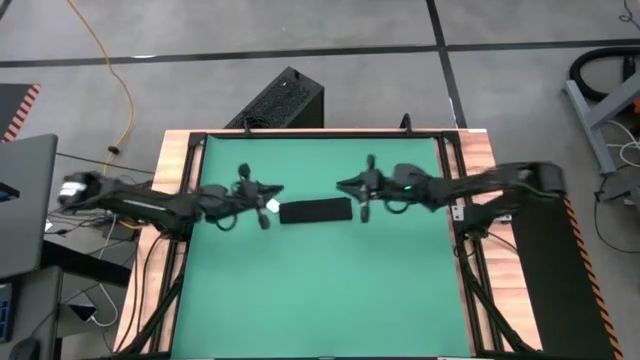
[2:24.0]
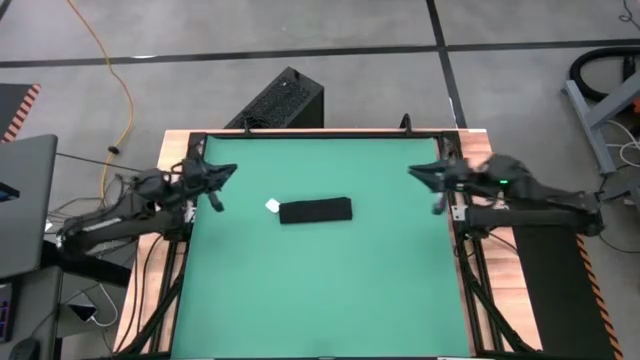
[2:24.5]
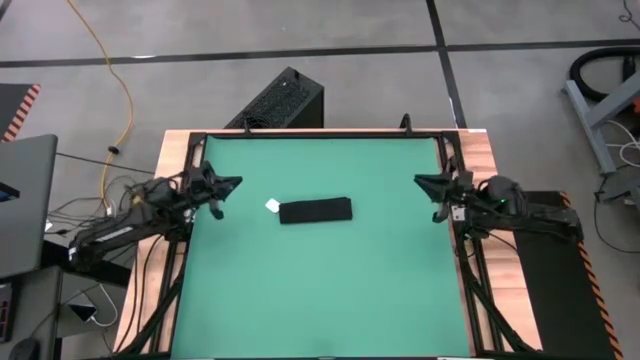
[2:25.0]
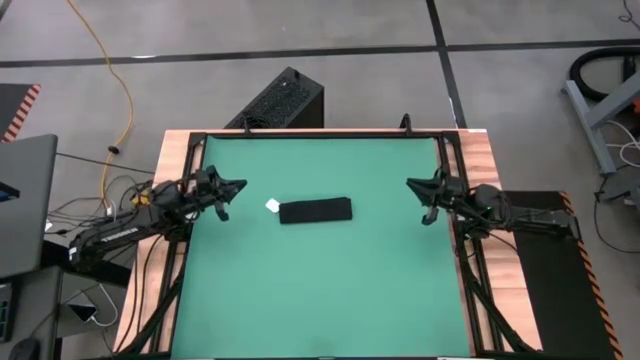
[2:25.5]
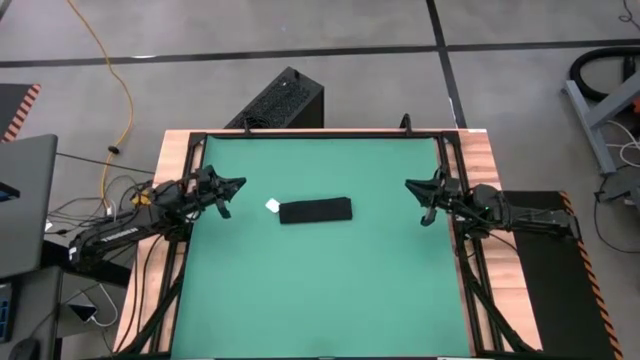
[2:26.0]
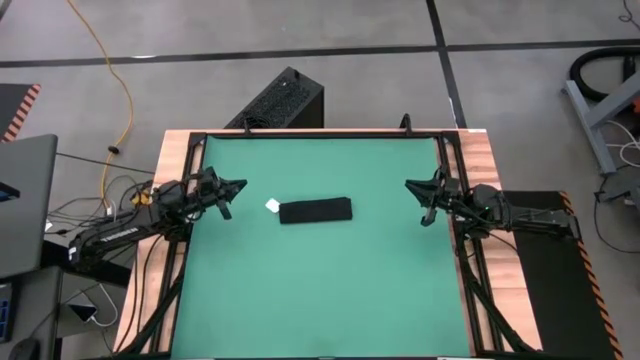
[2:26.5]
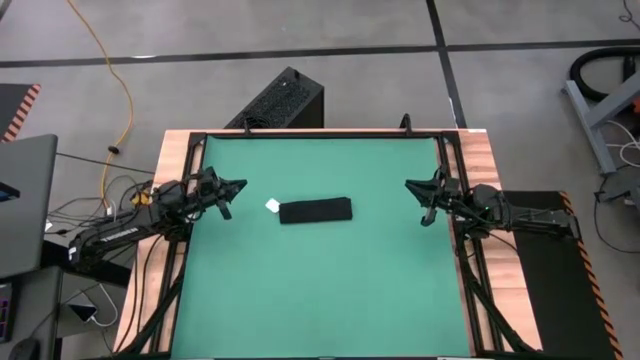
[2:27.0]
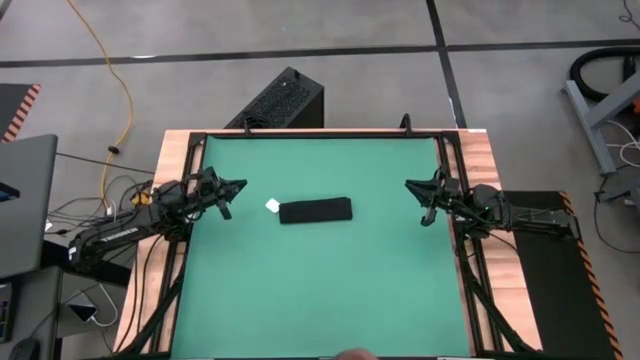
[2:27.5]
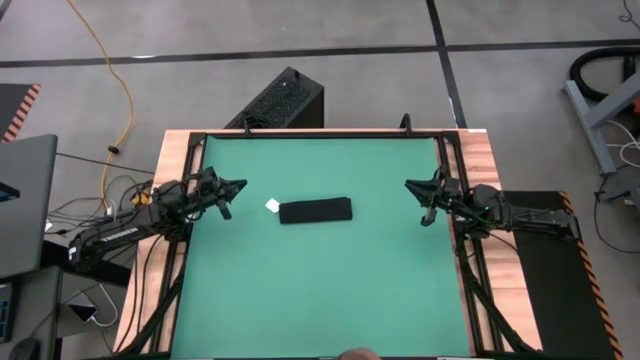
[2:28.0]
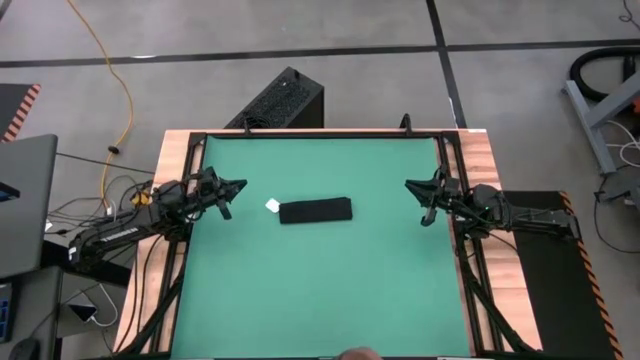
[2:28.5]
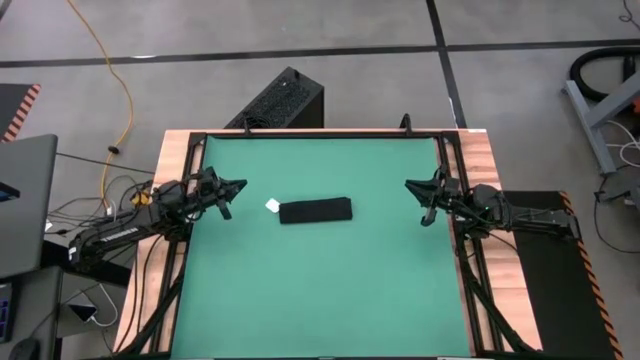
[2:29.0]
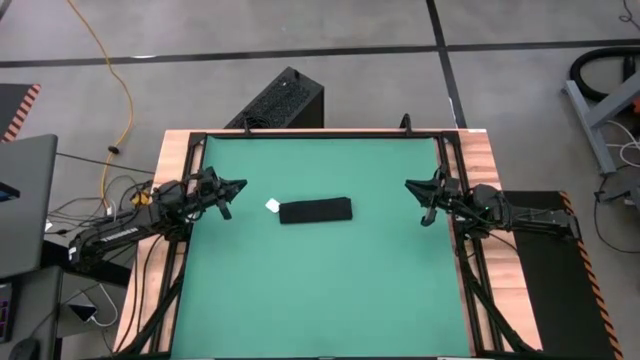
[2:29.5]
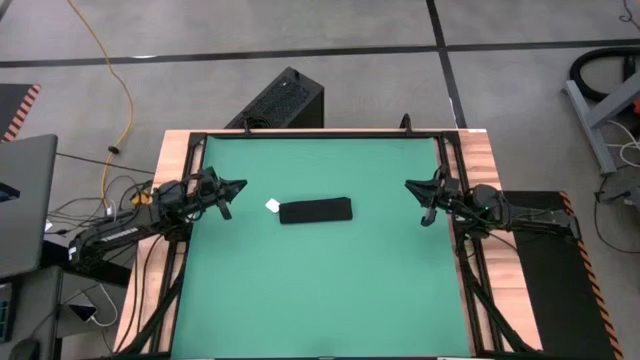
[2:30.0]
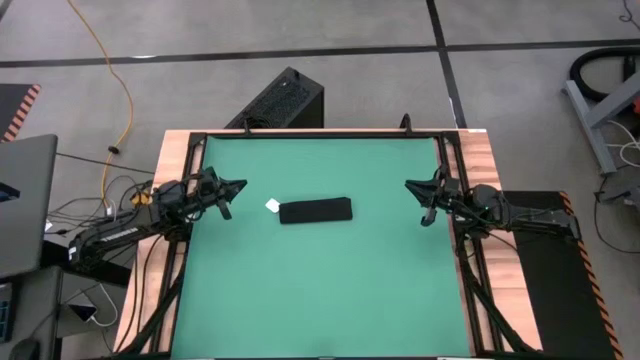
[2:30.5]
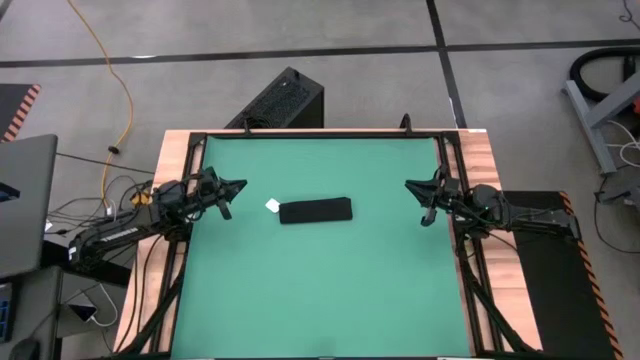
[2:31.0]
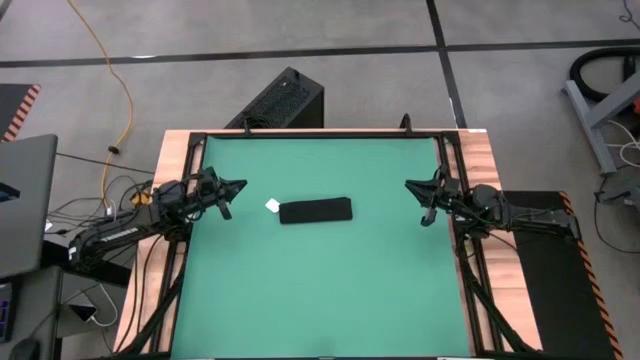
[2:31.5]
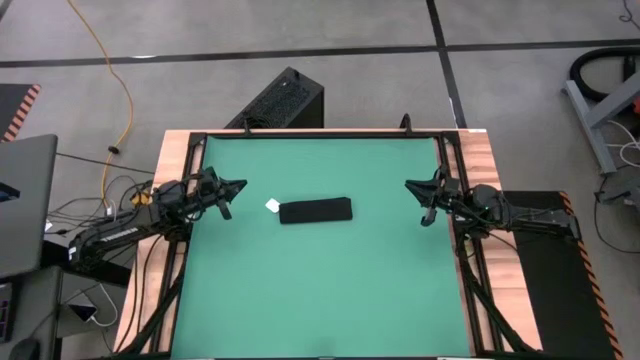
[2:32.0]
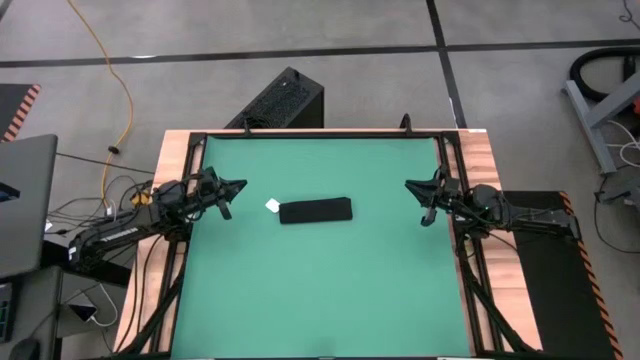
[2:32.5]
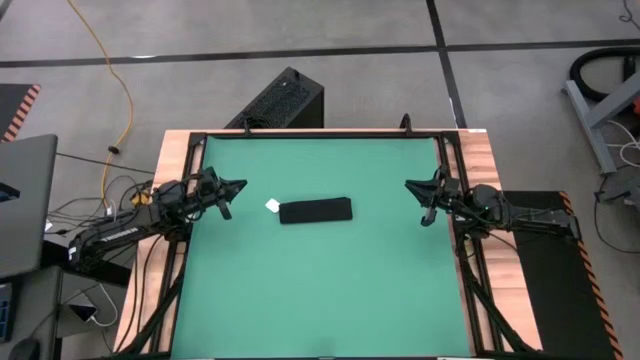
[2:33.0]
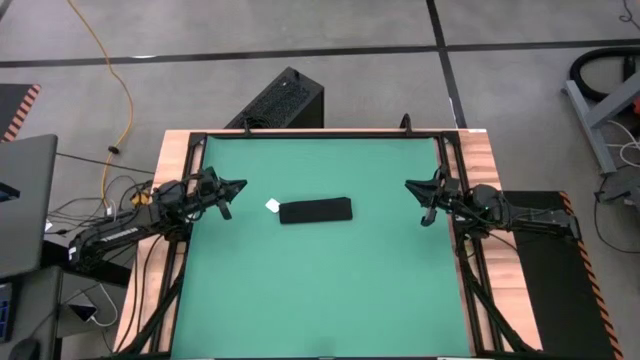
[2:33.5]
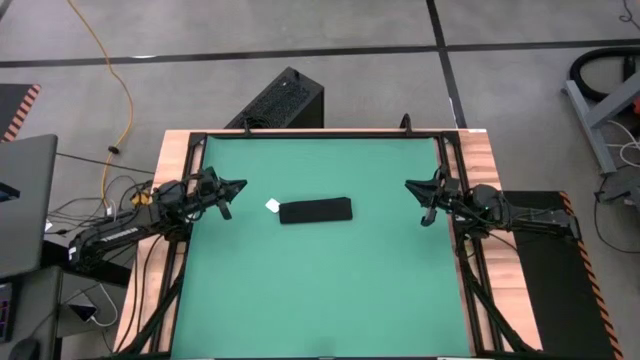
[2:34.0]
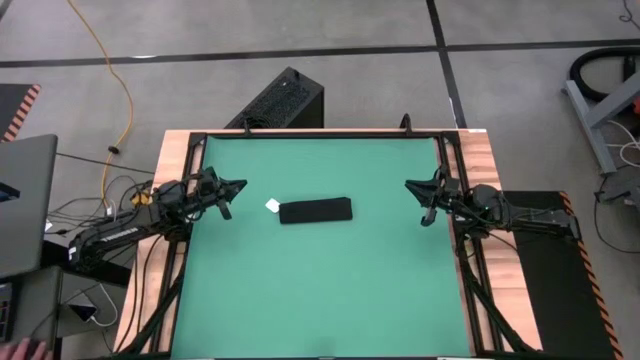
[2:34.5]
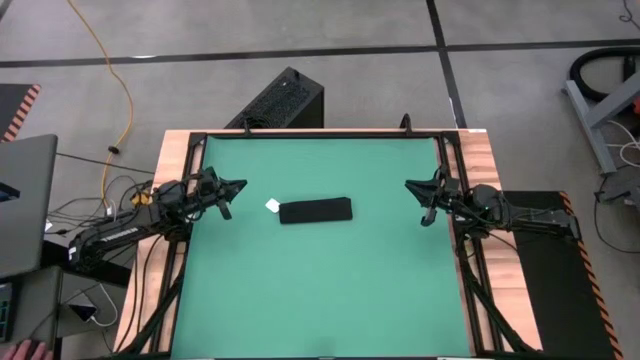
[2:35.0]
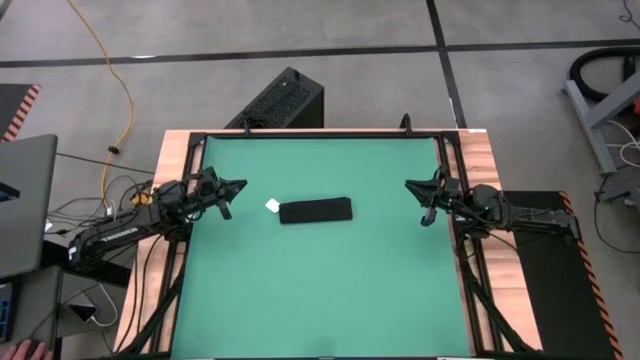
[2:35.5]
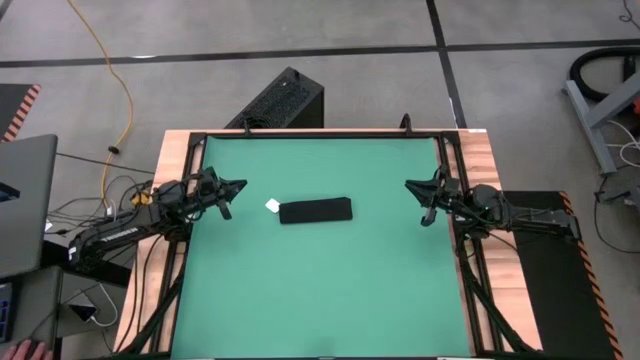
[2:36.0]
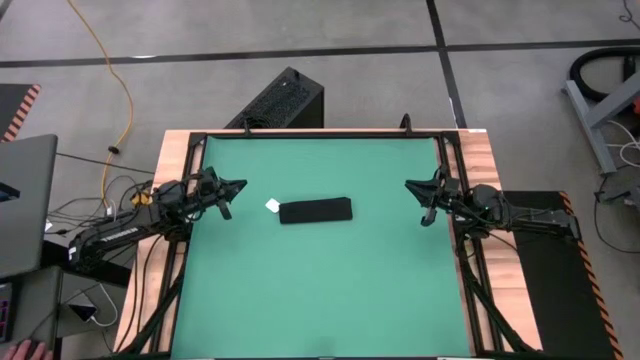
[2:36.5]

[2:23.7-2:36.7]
Task: Roll towel
Return to Home Position

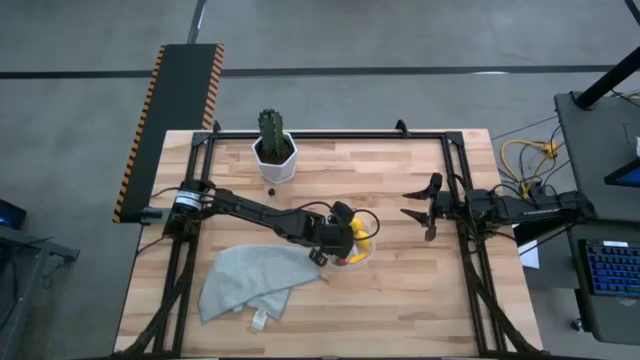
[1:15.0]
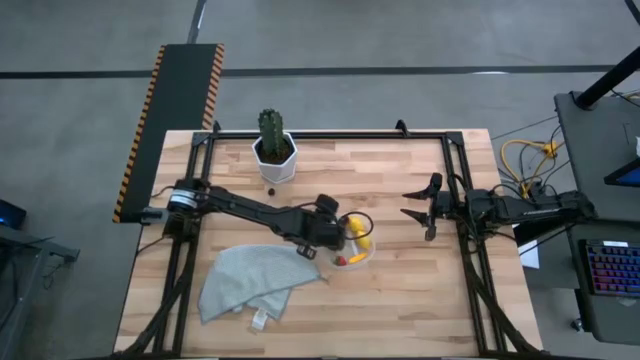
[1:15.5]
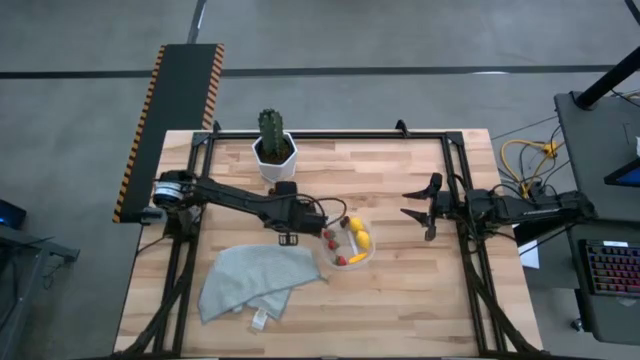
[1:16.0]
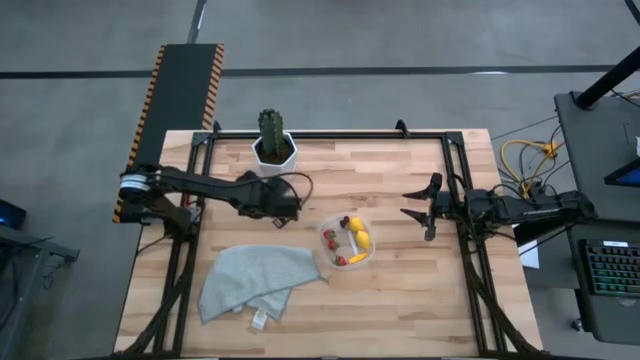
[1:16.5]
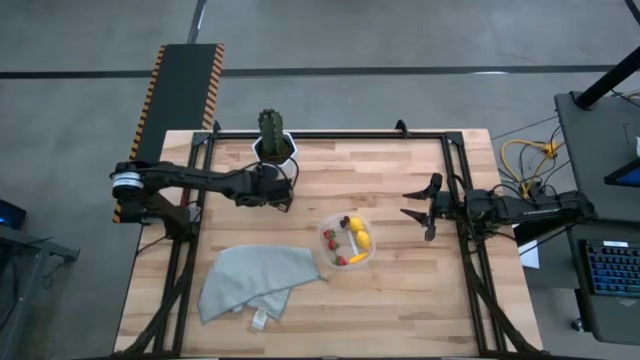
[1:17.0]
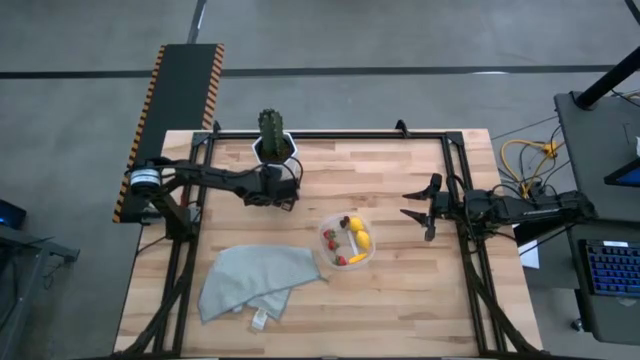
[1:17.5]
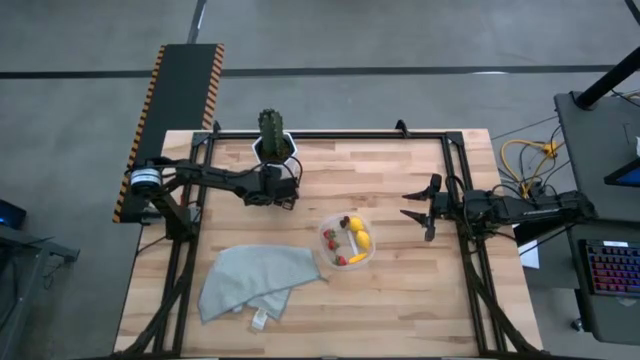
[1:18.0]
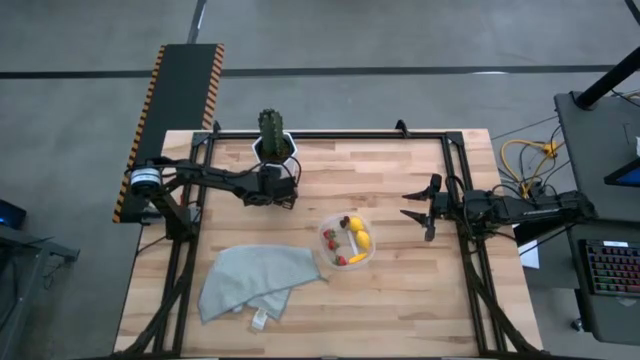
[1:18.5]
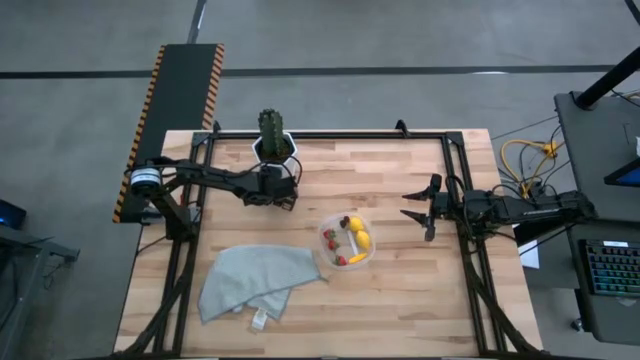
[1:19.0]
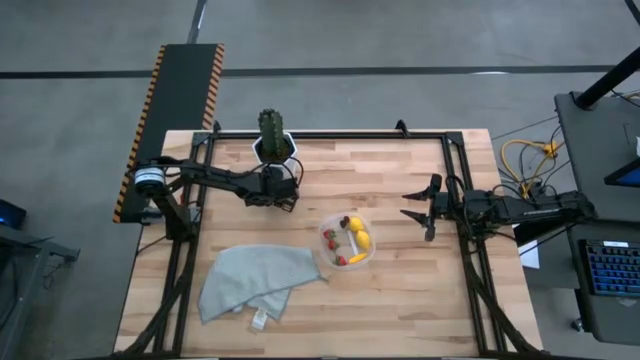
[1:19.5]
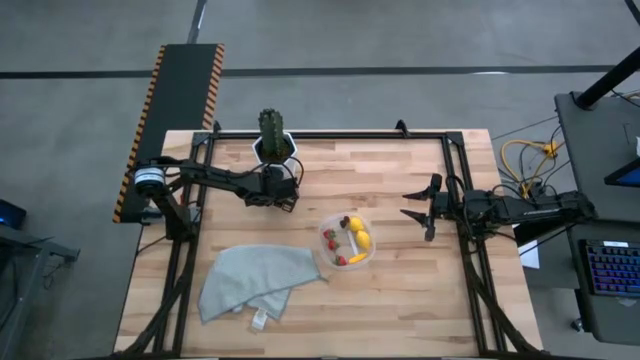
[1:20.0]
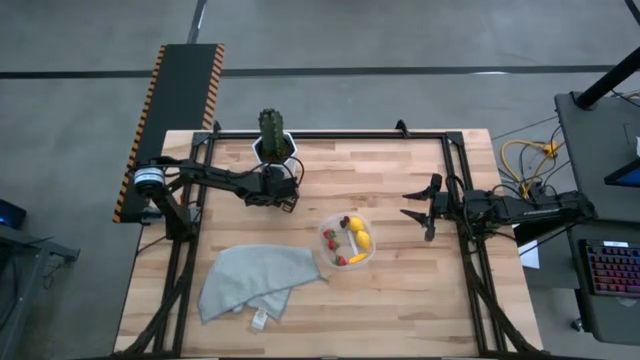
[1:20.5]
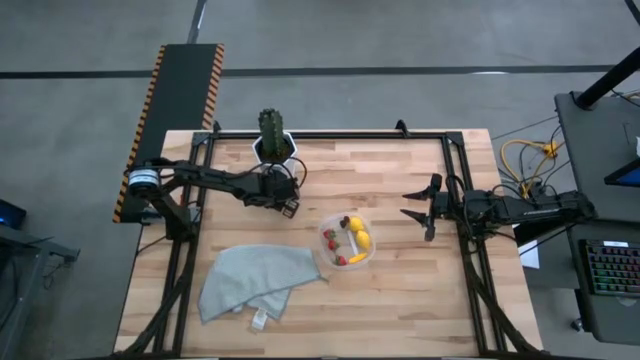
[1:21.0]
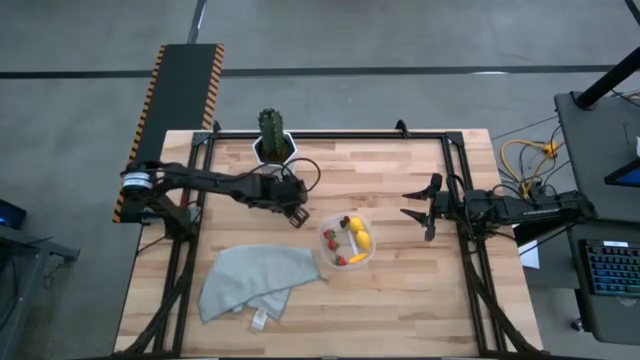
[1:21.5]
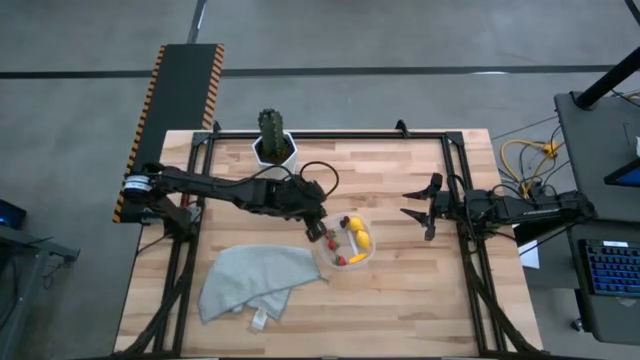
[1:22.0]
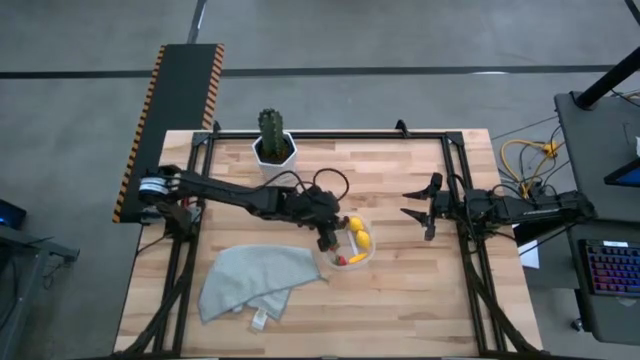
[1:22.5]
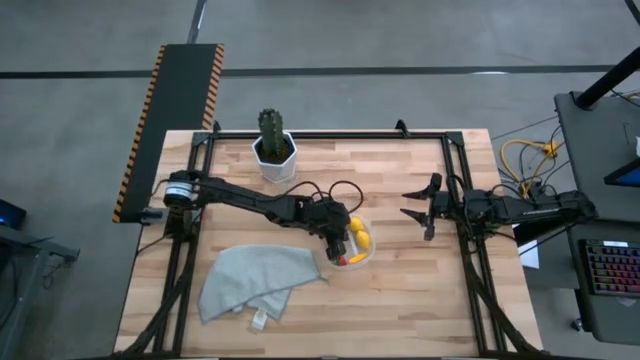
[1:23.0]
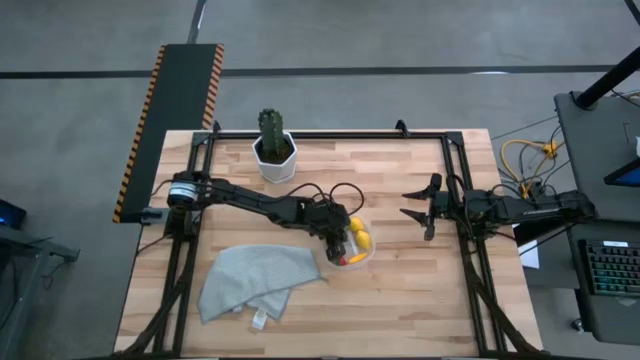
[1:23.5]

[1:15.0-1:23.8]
Task: Pick and placing Produce into tupperware
Put the black cherry into the transparent container
